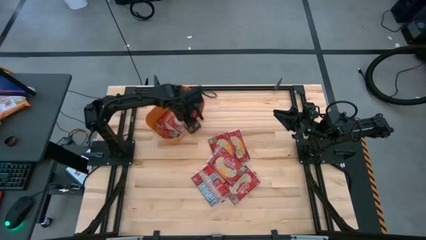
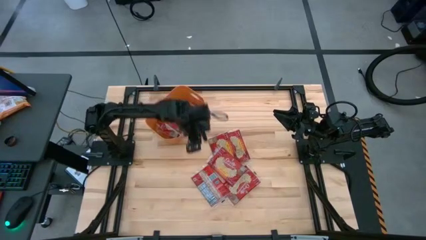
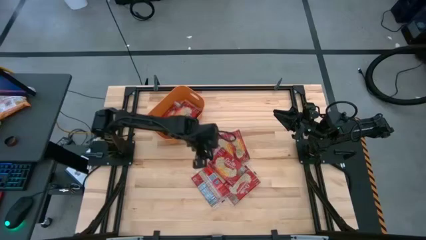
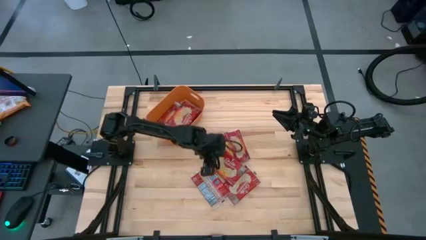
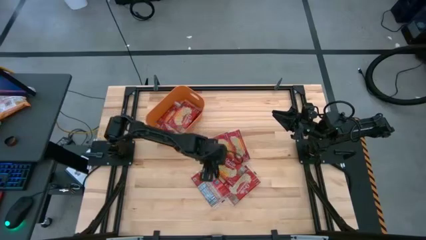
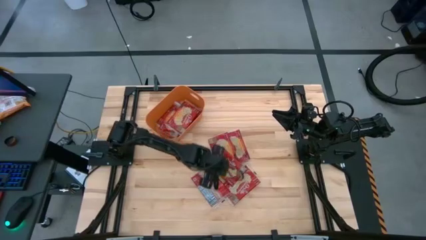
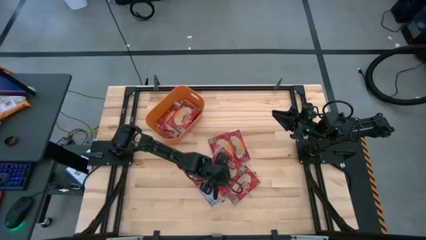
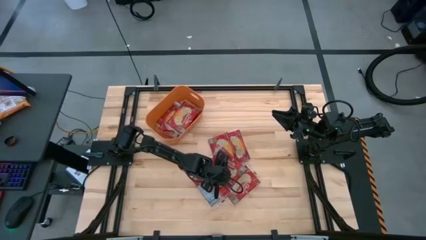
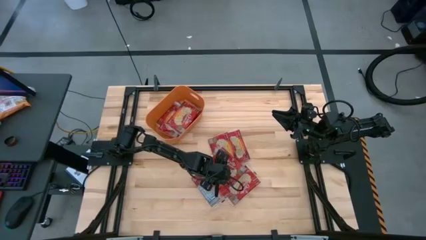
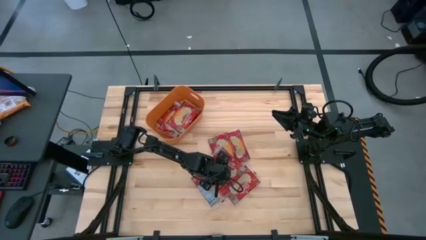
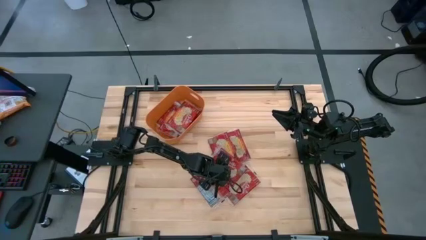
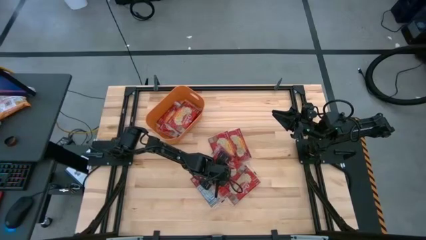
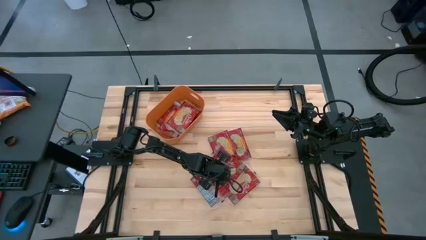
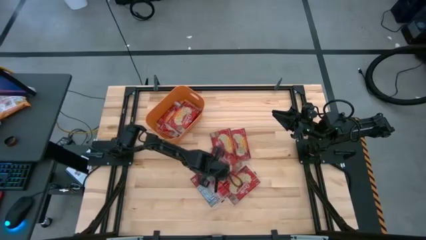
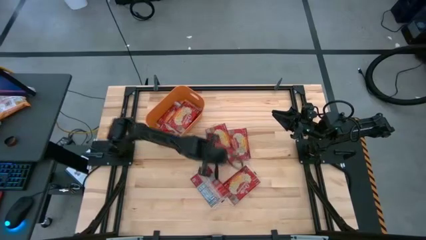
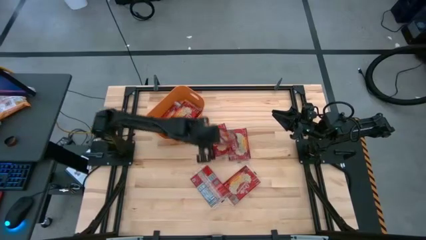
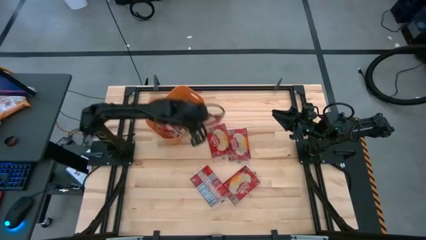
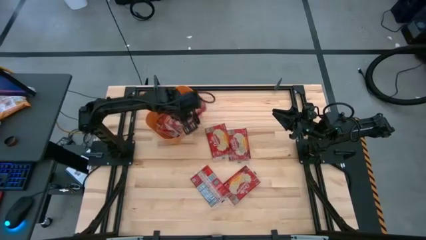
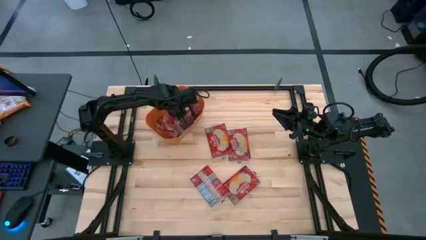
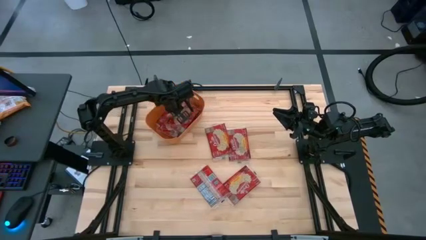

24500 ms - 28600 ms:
Task: Sort popcorn bags into baskets
Put the red popcorn bag into the orange bin

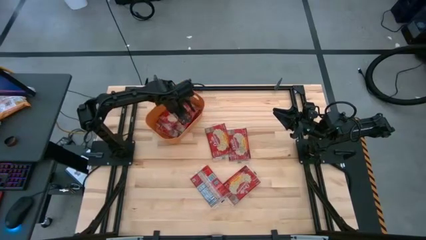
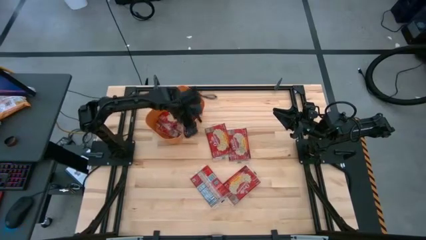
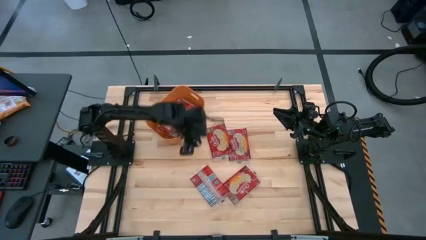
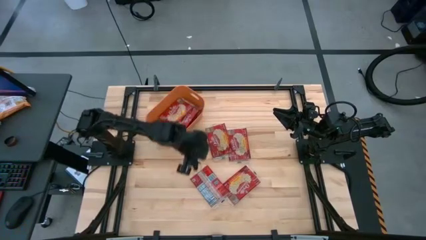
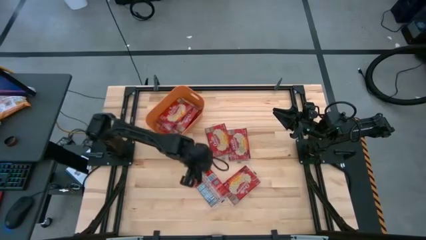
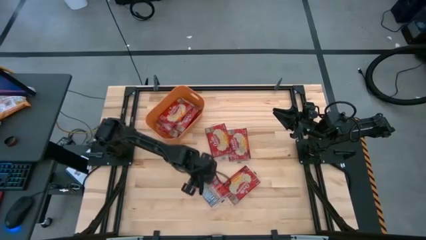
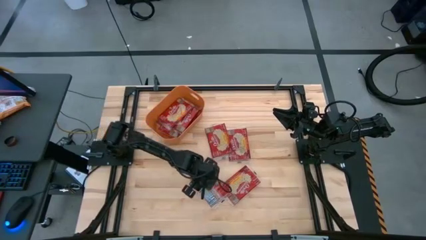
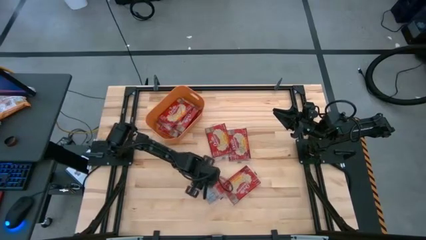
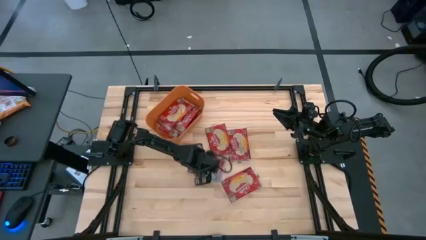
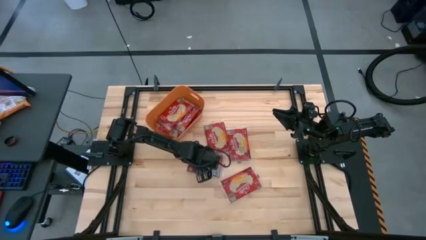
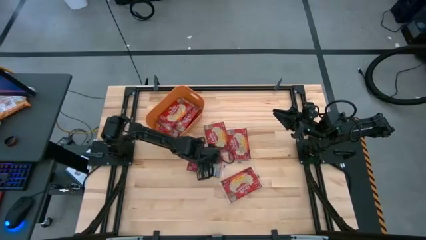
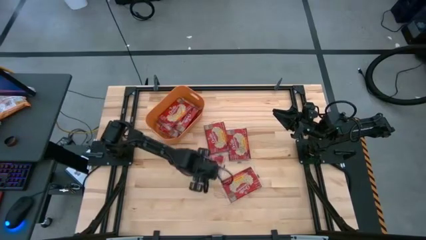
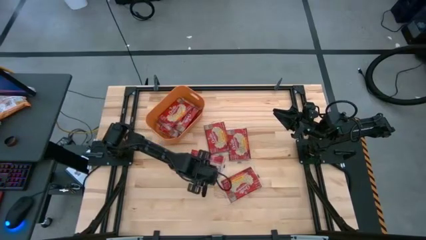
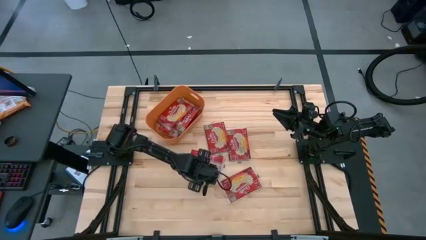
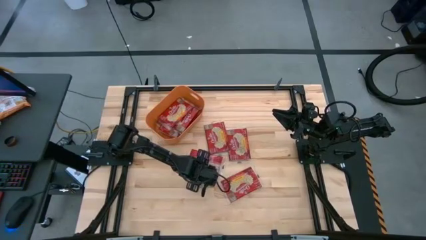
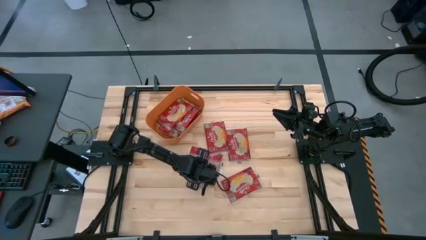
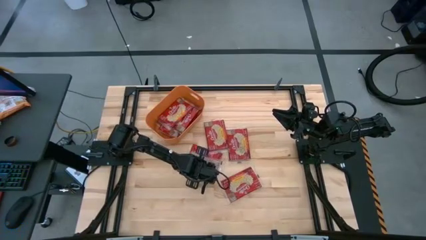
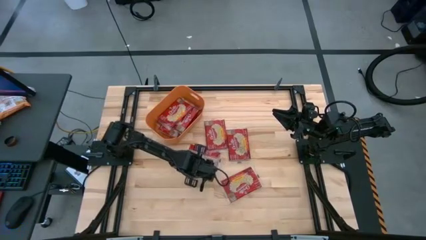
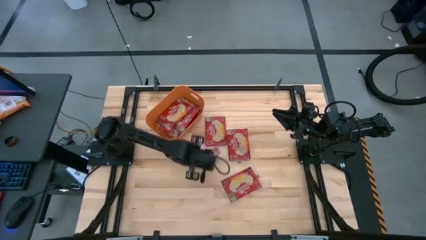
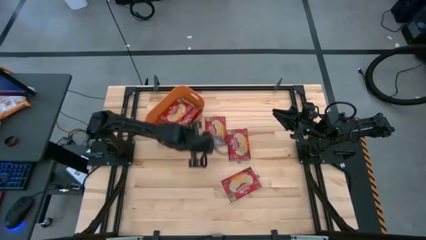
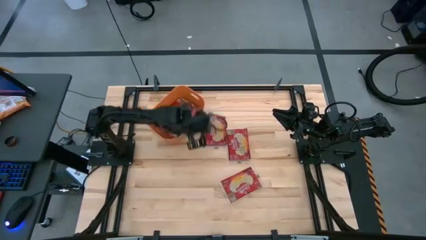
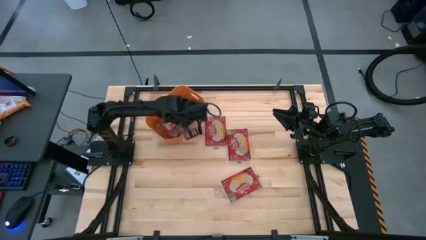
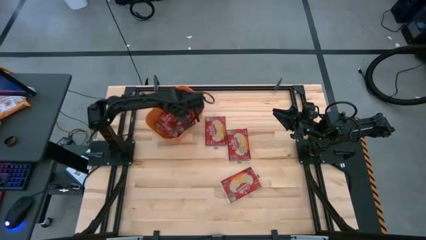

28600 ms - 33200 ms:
Put the red popcorn bag into the orange bin

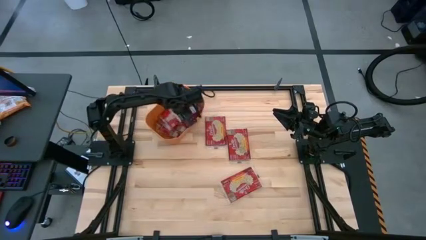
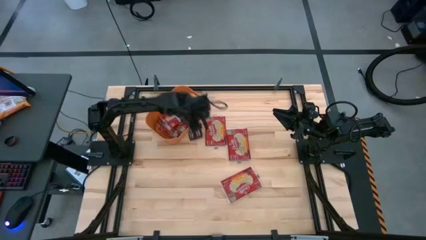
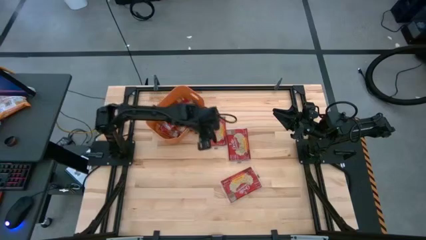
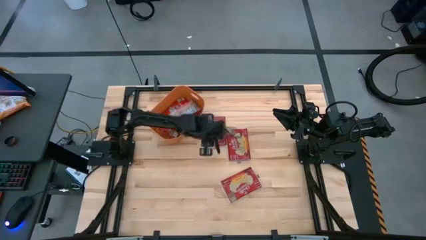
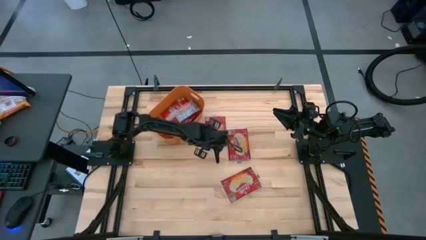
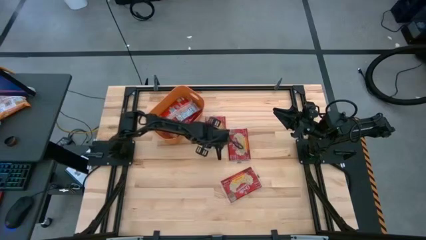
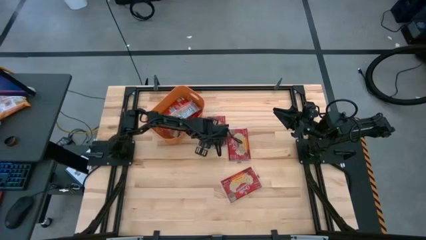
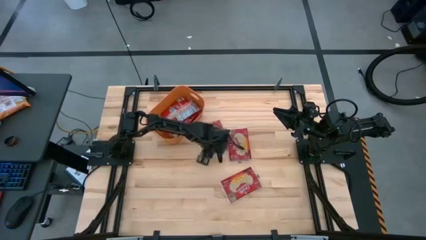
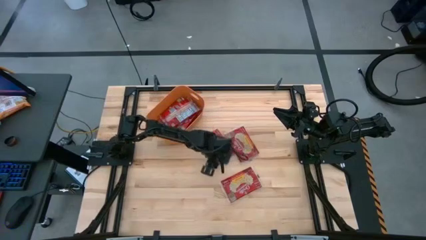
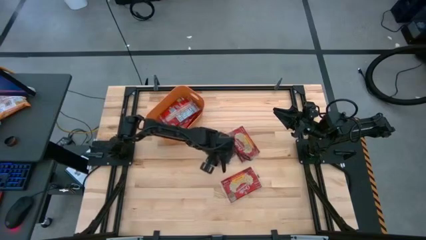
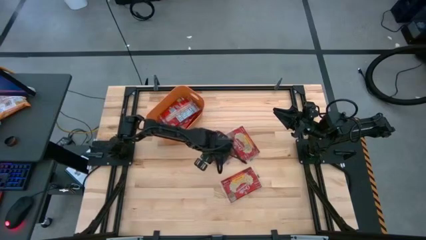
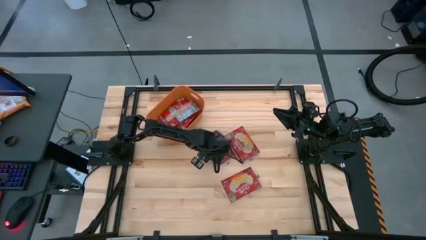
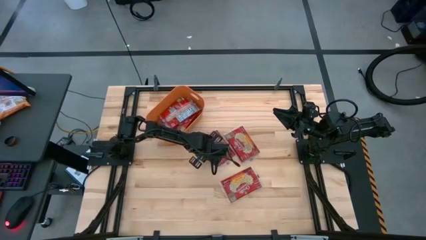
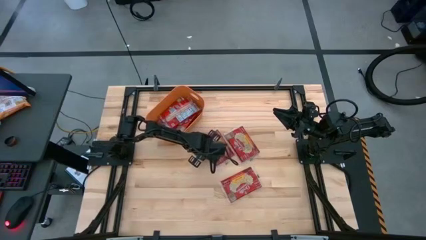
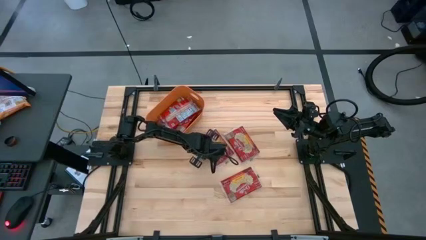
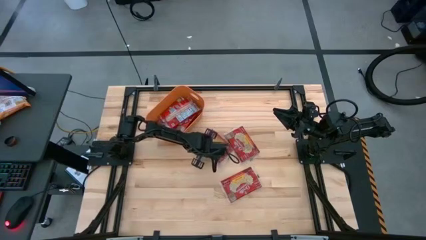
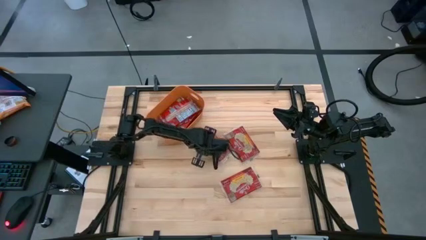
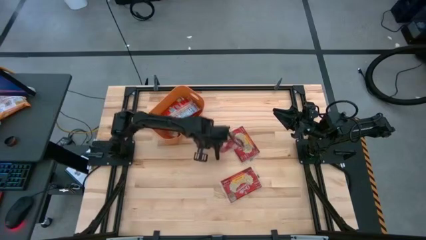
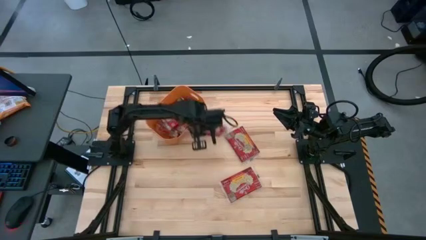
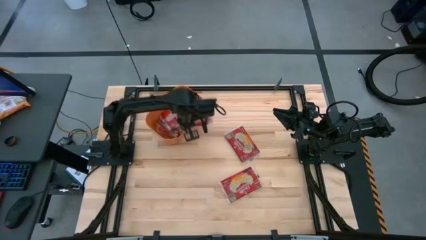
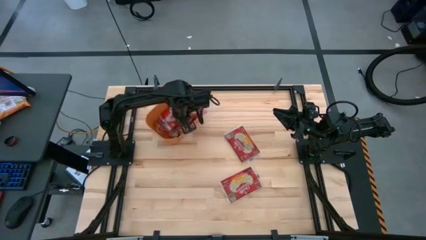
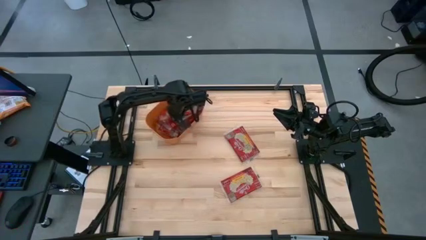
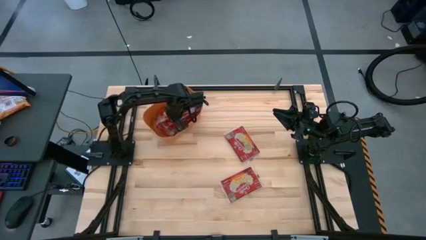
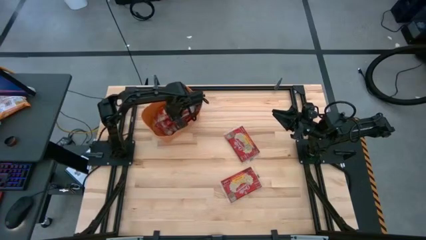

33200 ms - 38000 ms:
Put the red popcorn bag into the orange bin

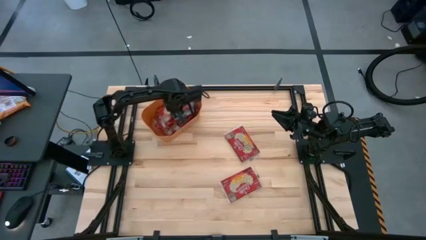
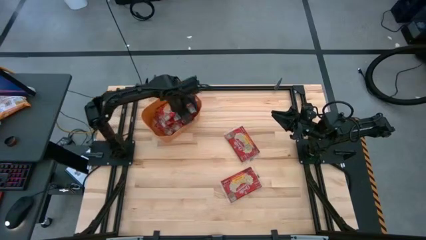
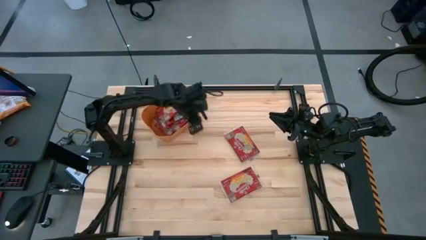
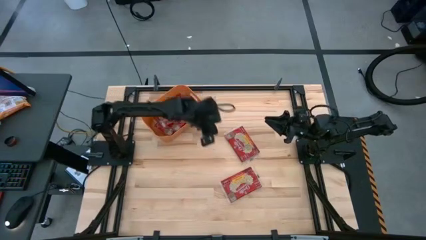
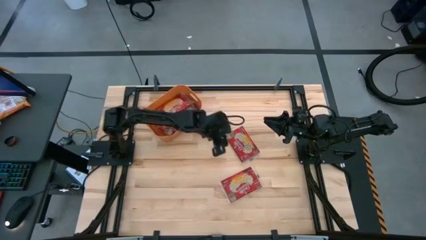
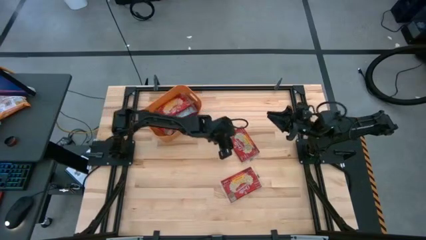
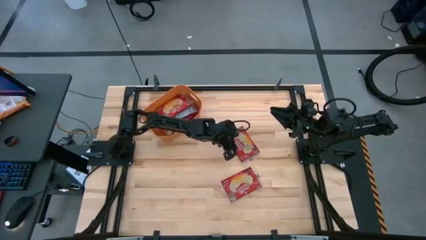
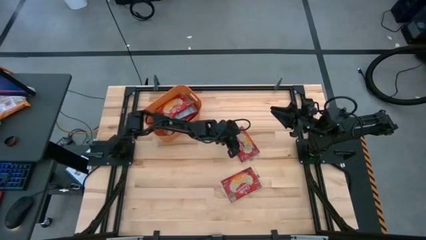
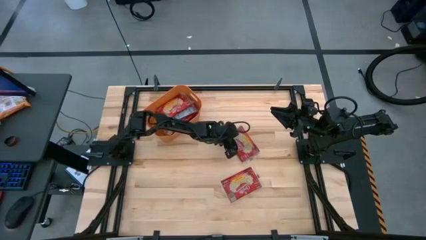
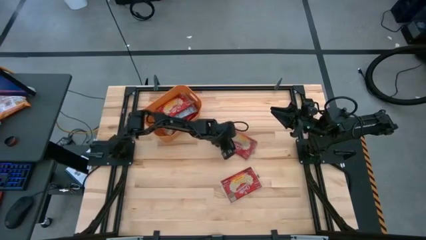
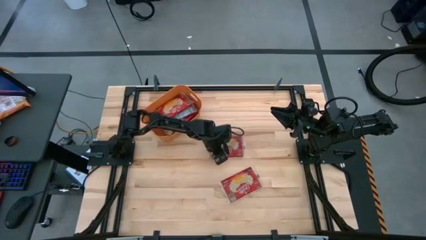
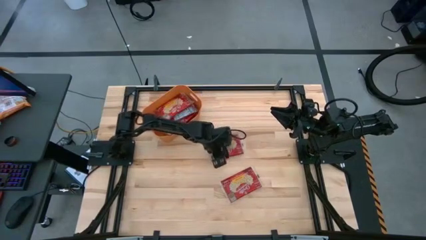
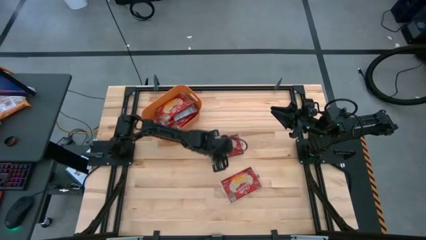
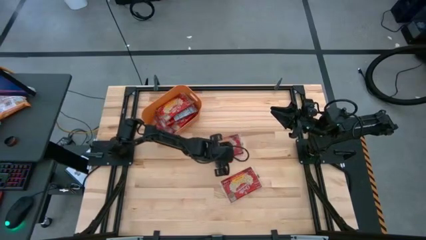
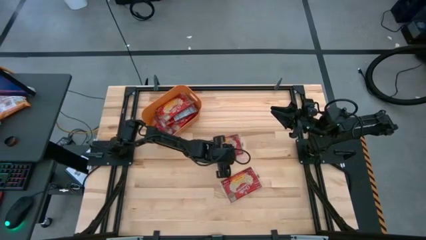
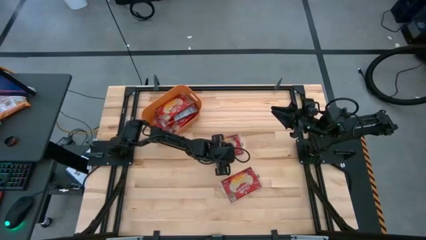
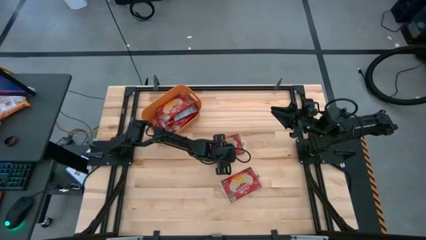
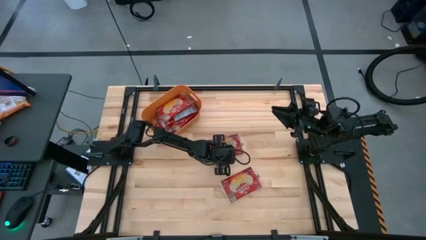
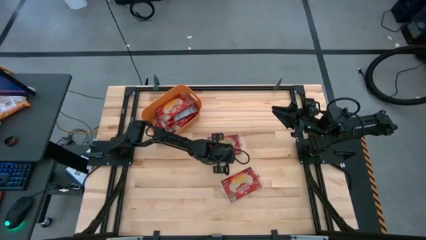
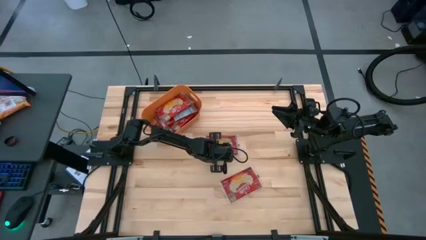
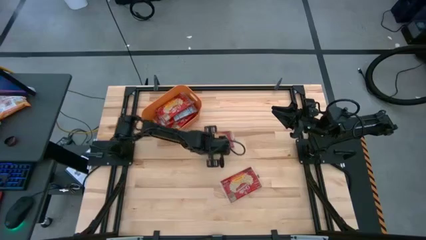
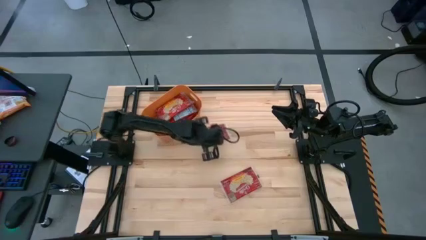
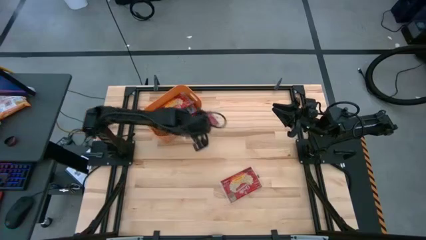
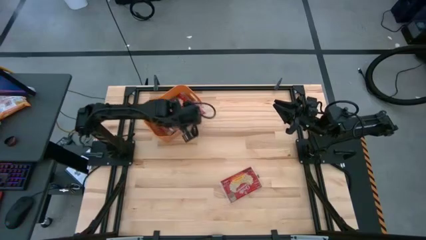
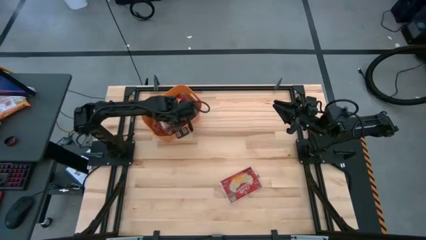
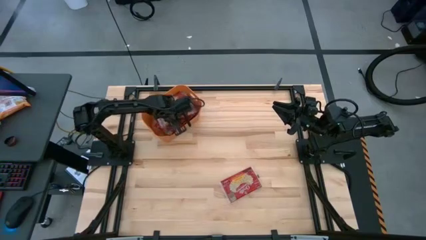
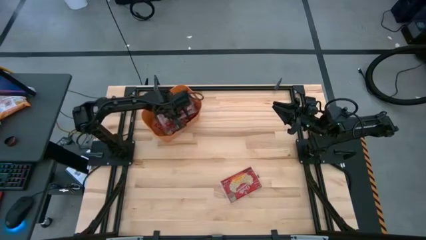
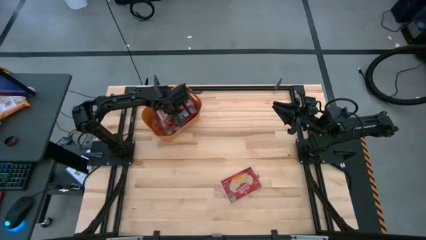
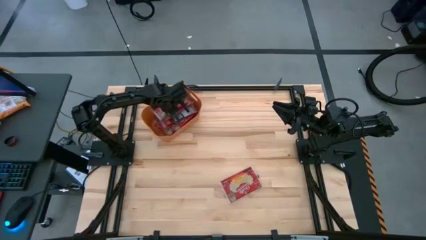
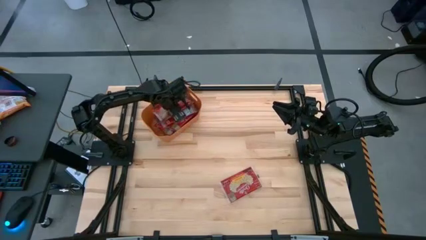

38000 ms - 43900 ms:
Put the red popcorn bag into the orange bin
